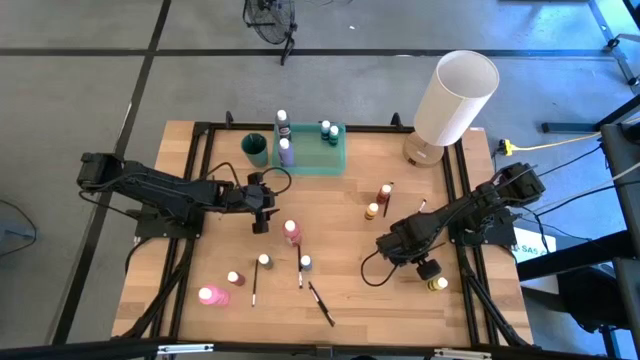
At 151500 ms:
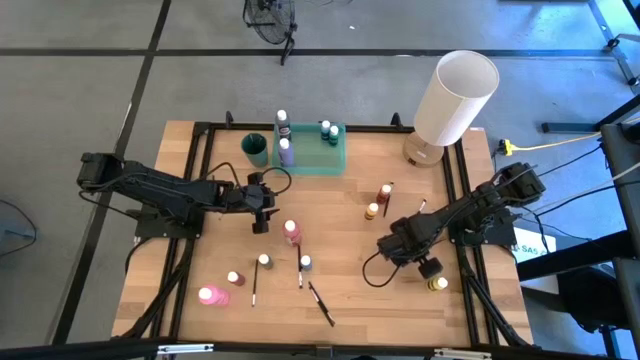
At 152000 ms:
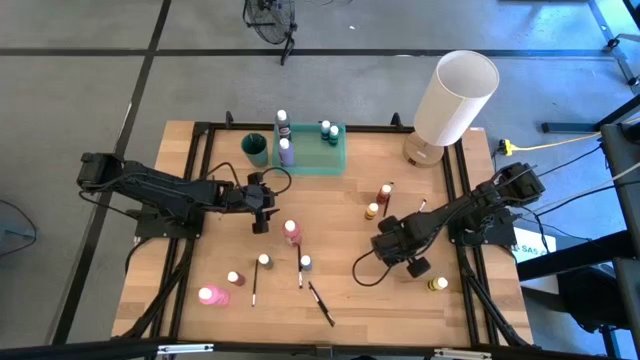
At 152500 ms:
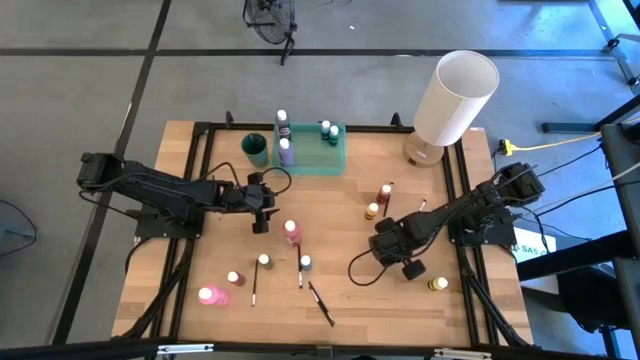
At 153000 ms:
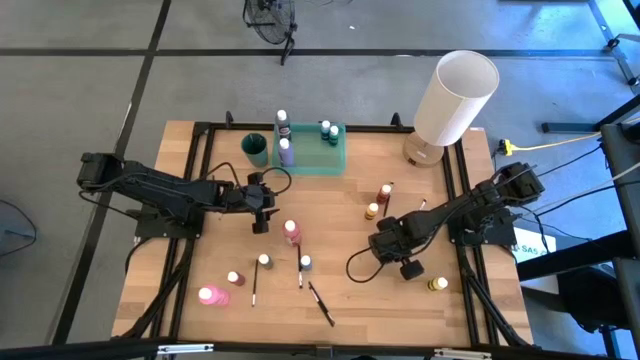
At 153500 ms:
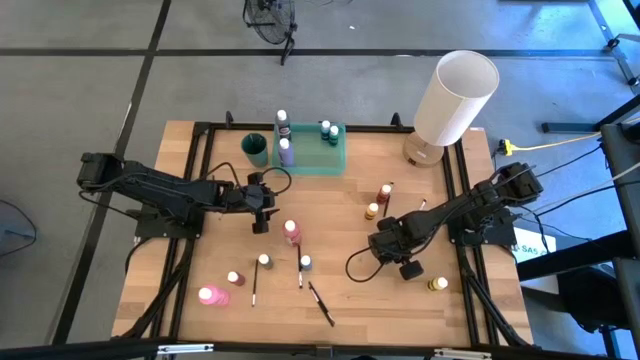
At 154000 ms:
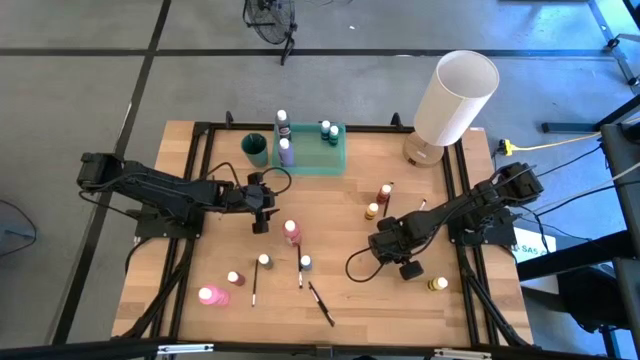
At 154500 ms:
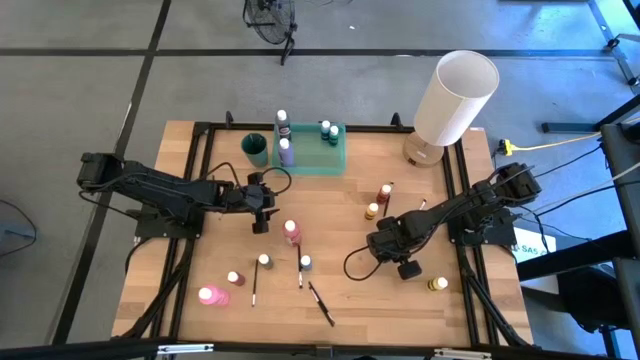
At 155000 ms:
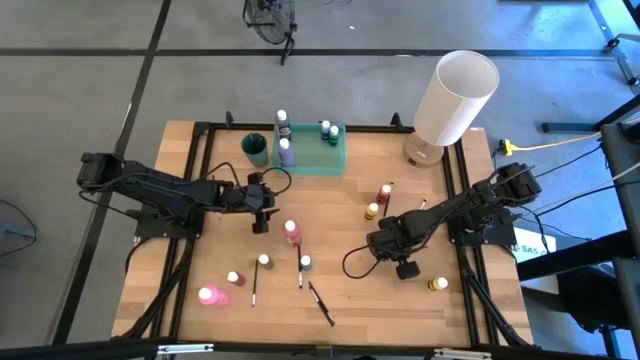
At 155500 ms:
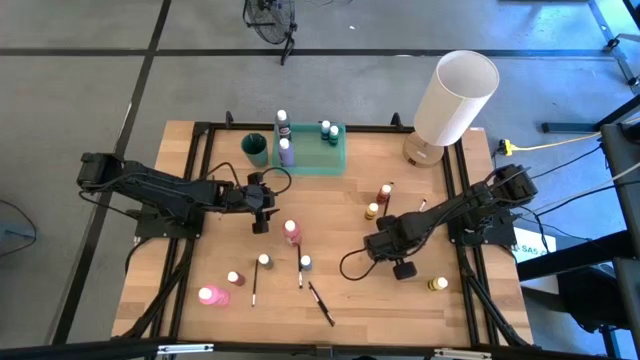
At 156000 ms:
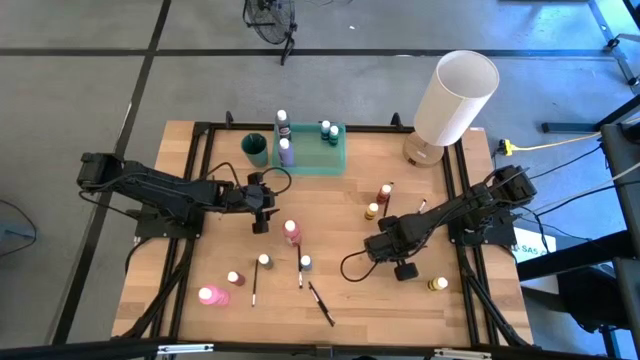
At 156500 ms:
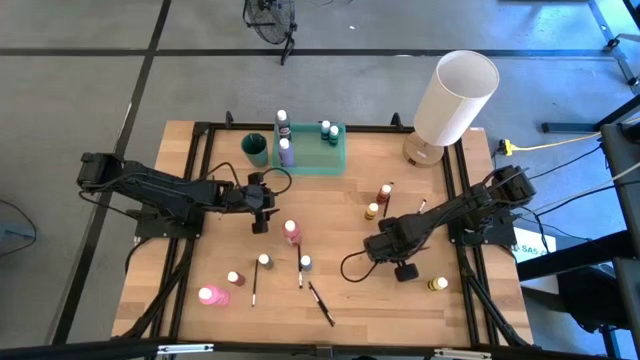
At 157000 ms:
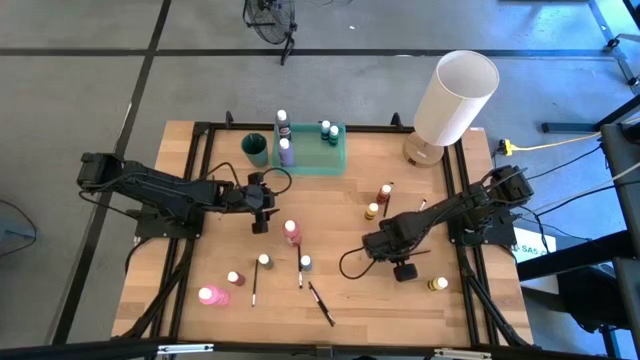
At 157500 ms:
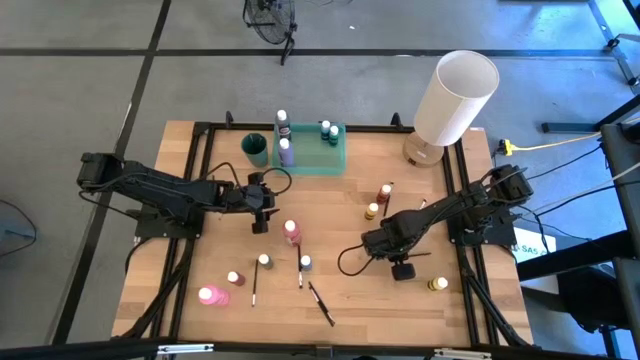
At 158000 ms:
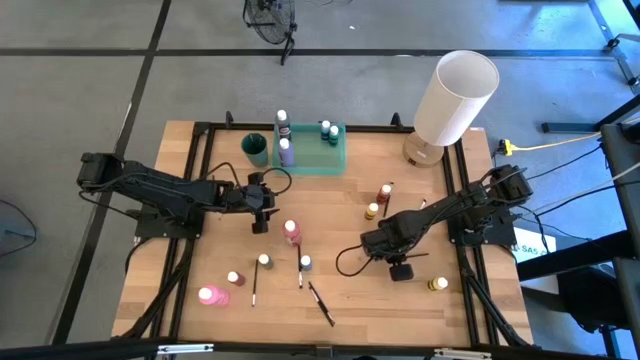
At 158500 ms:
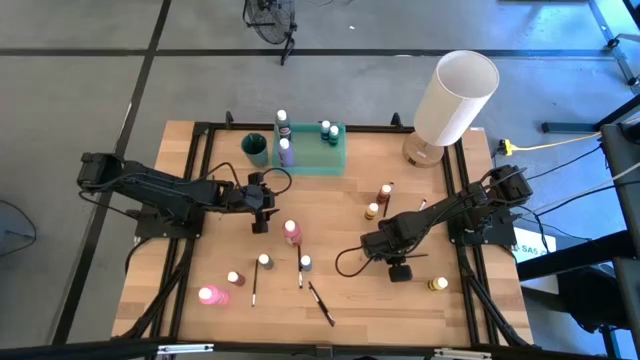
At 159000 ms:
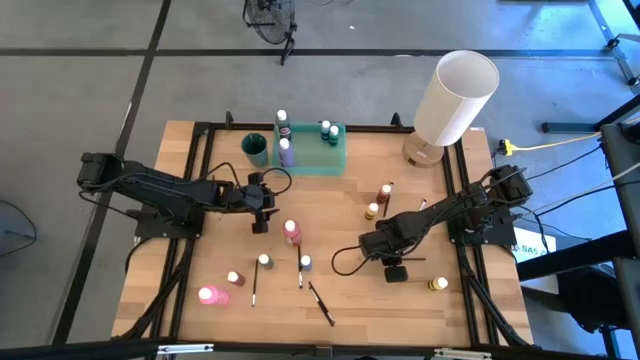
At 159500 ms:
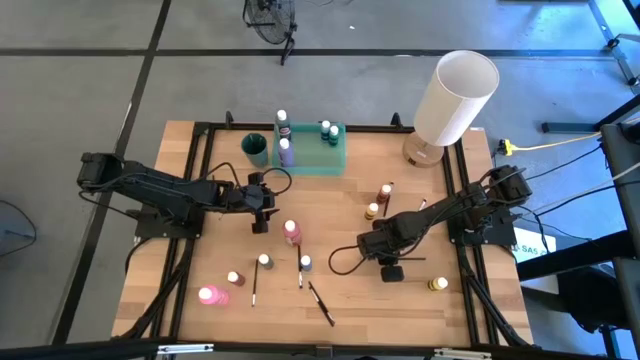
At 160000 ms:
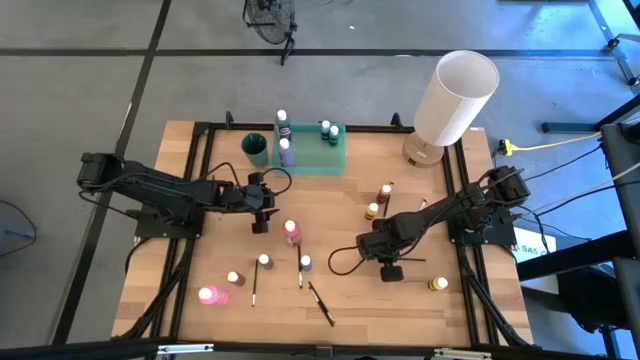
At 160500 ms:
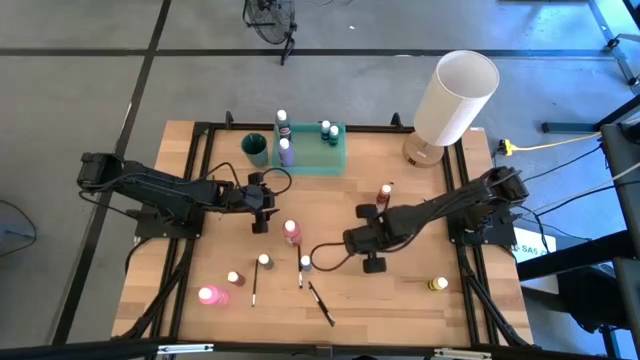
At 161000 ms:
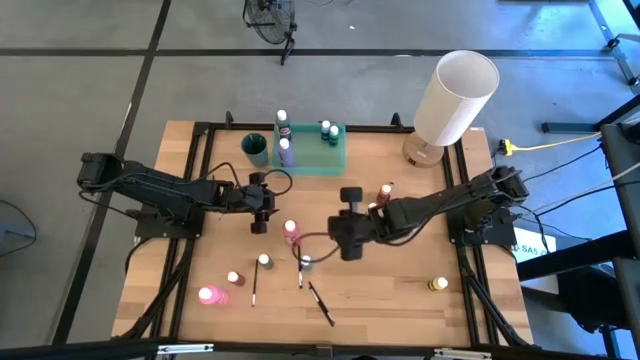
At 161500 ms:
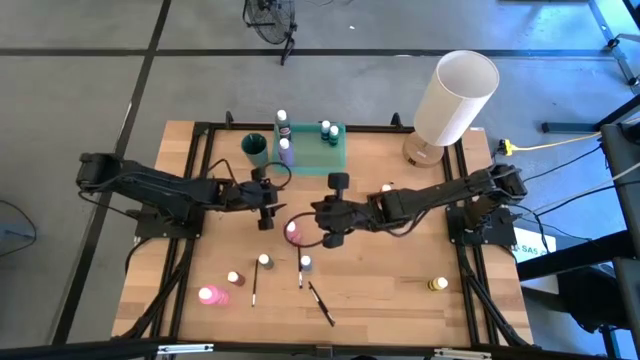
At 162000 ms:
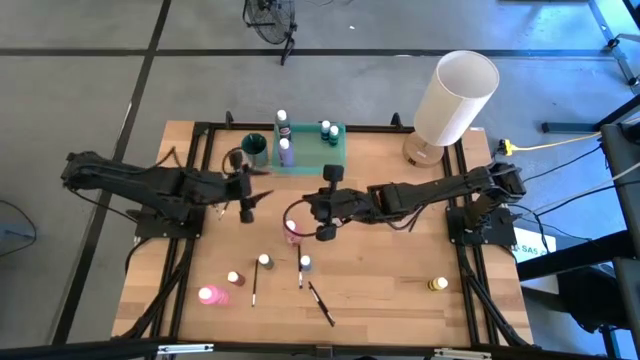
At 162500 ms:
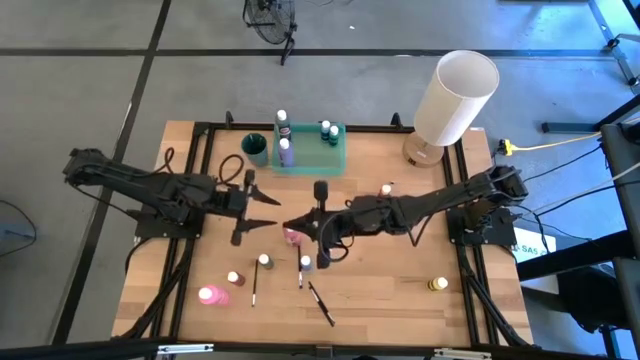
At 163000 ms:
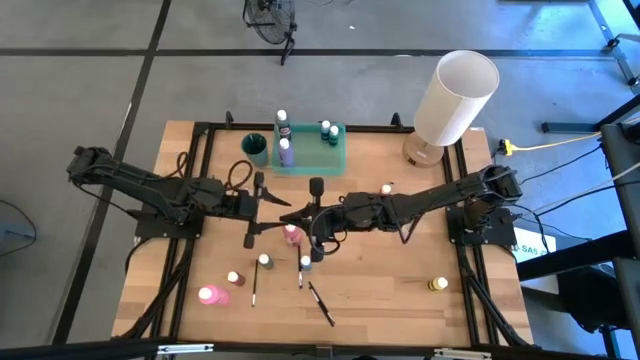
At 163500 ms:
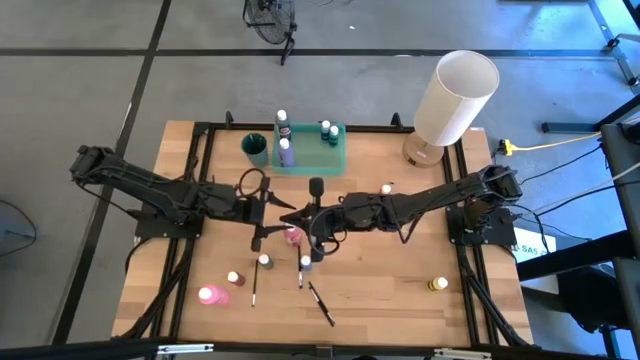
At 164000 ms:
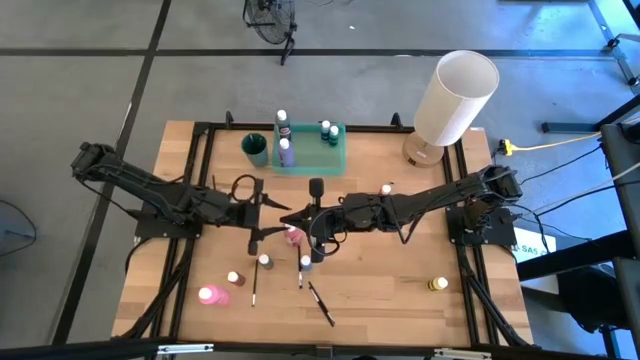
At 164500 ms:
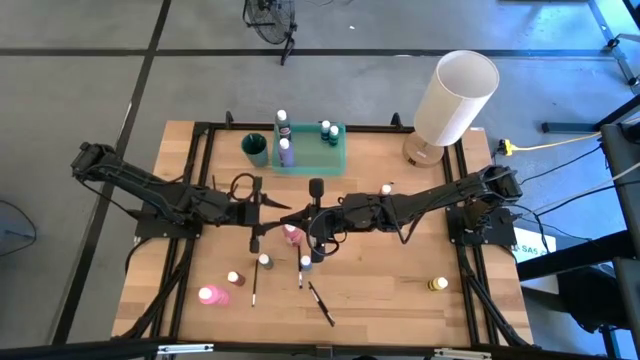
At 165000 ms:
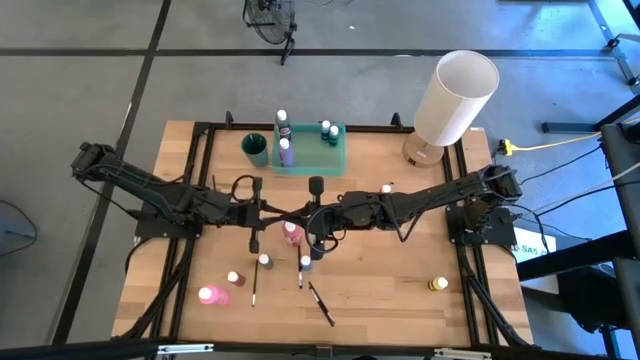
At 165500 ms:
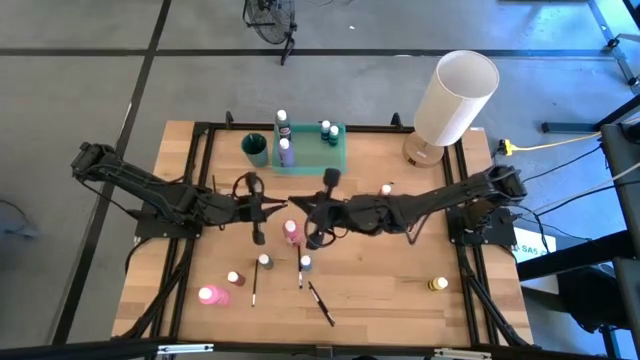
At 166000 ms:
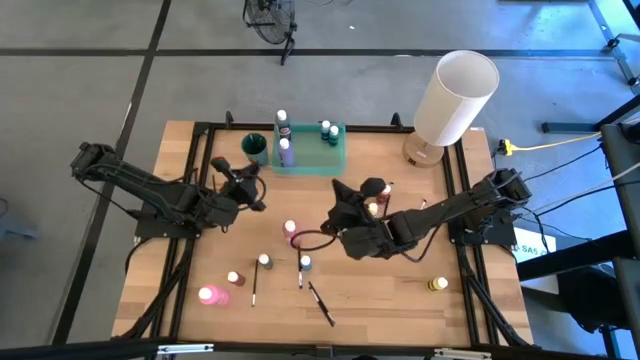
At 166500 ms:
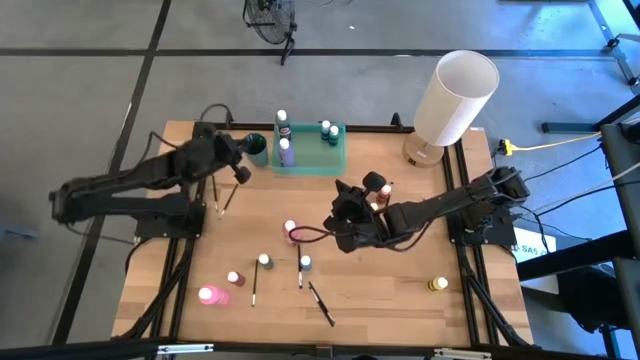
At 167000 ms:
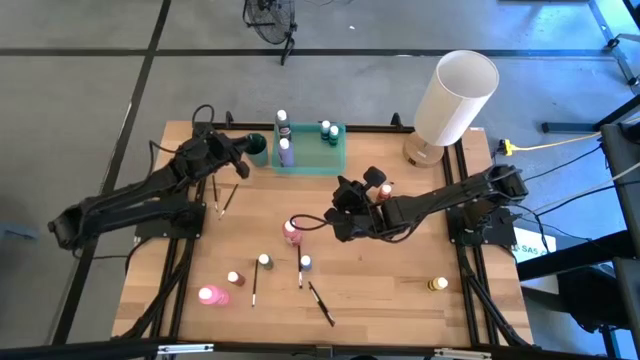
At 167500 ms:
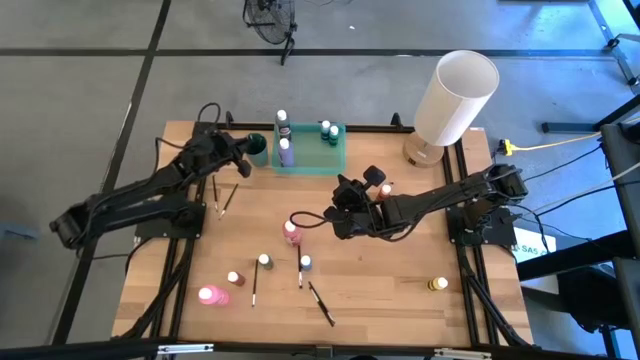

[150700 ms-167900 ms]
Task: Pick & Place Paint Supplies
Put the silver paintbrush into the green cup

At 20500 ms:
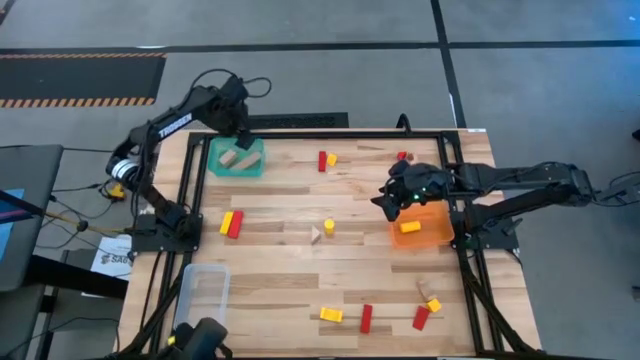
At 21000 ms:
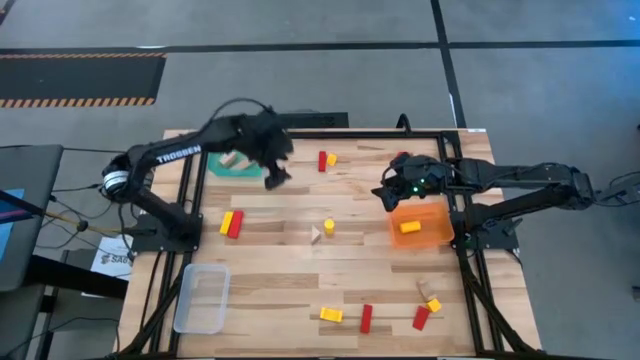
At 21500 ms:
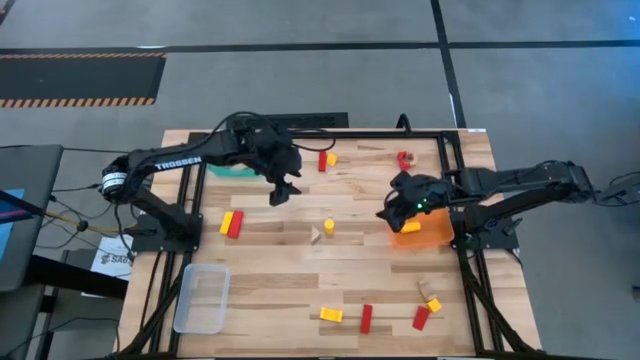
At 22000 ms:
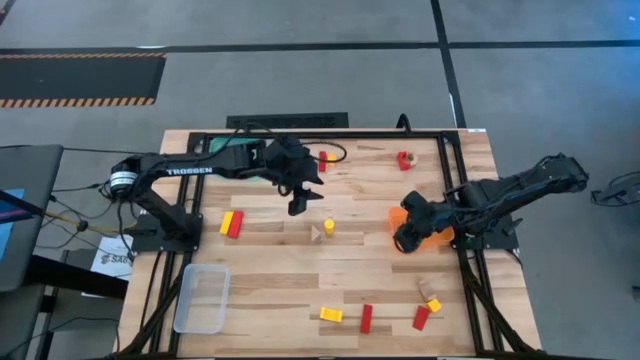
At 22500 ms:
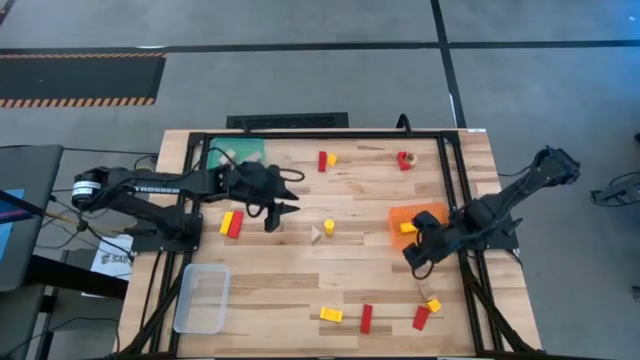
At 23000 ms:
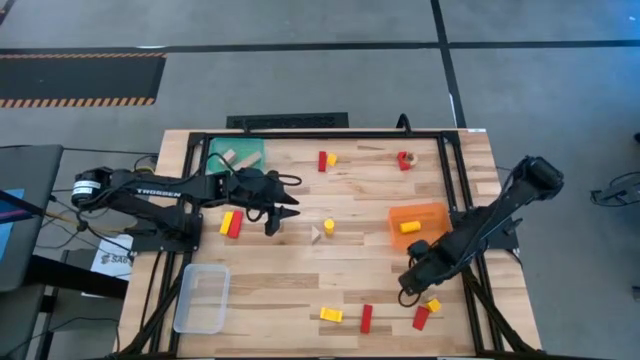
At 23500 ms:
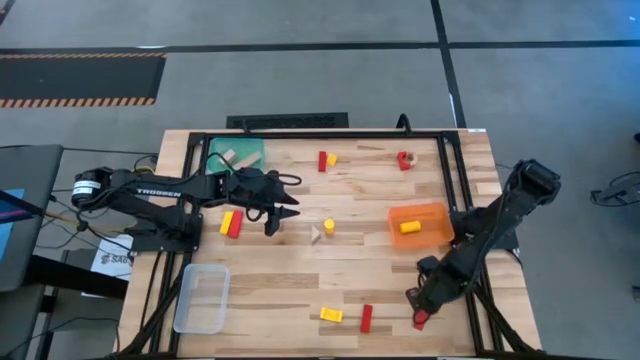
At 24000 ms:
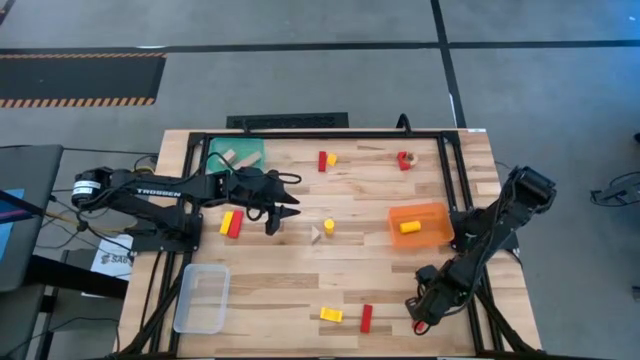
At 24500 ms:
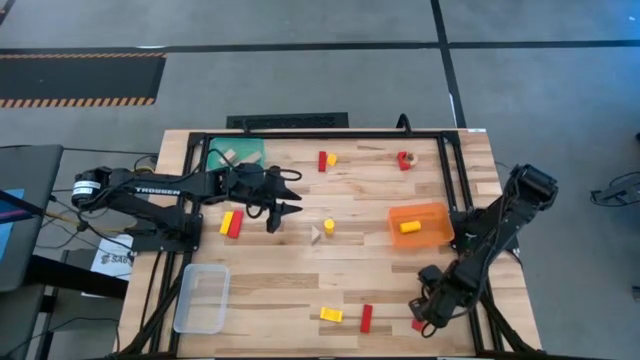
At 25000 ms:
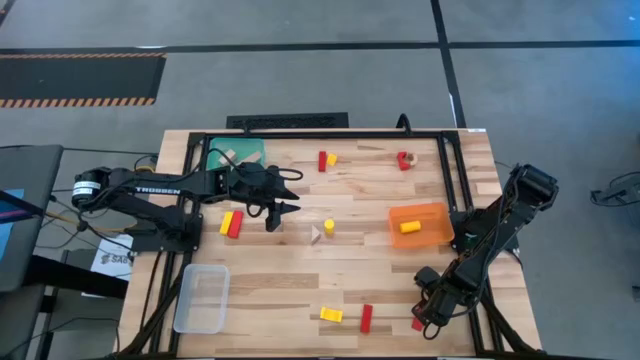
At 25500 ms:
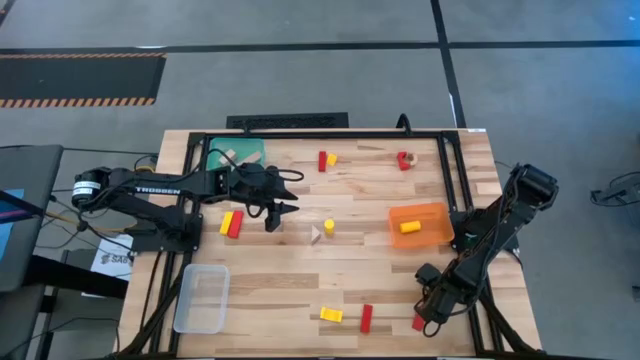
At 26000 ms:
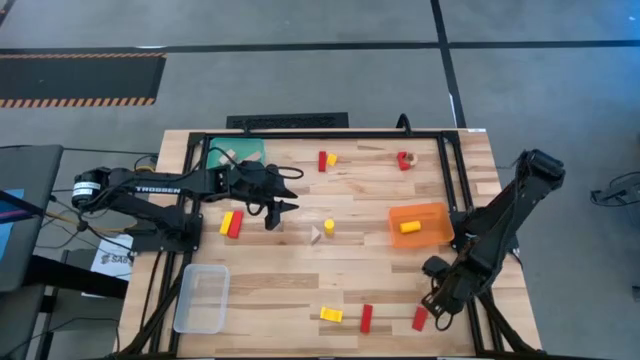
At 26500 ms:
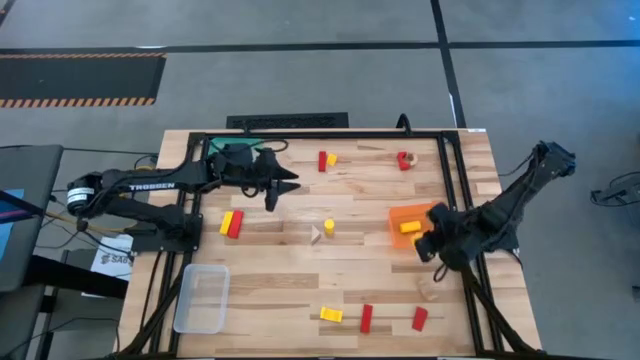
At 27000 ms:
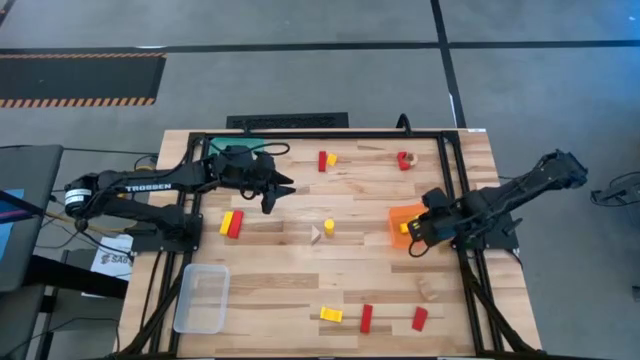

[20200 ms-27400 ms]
Task: Sort & place blocks by color
Put the yellow block into the orange bin
